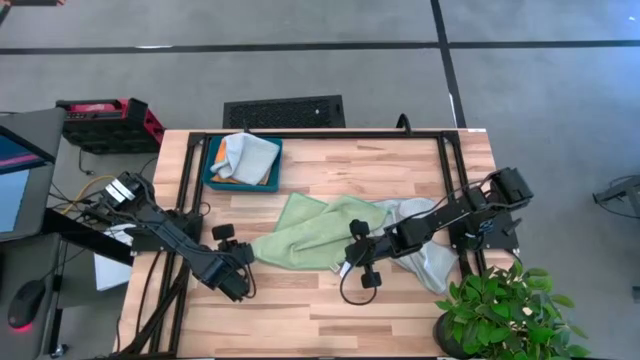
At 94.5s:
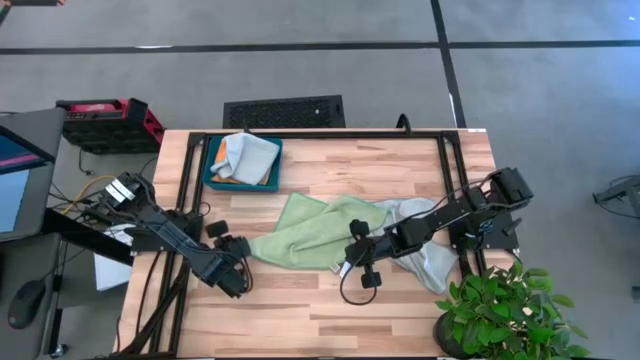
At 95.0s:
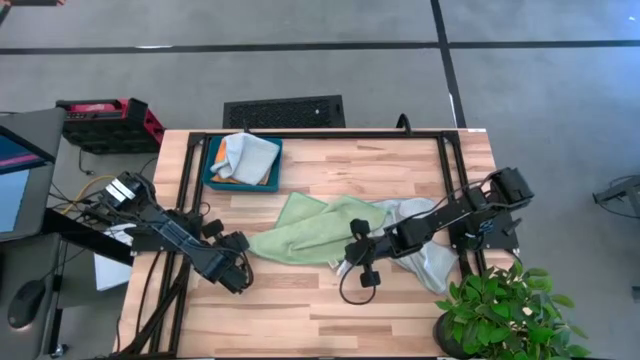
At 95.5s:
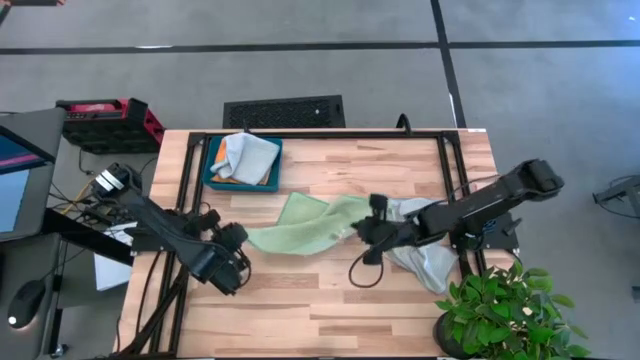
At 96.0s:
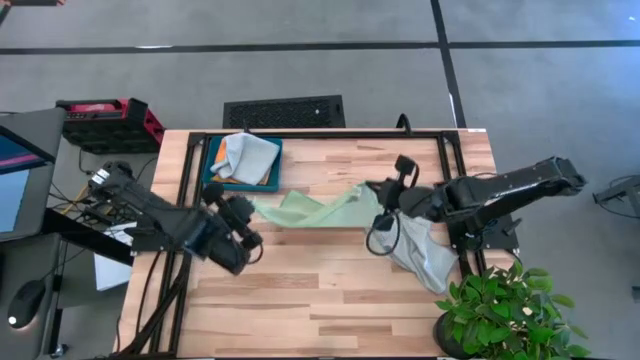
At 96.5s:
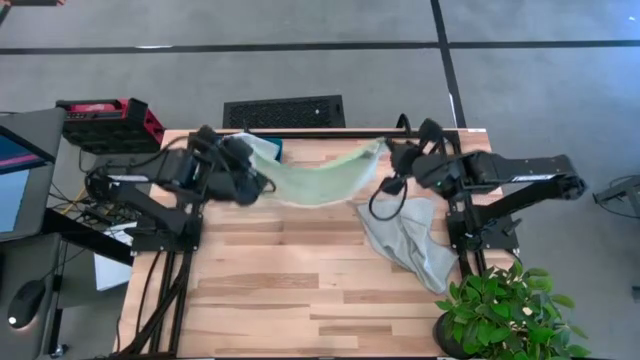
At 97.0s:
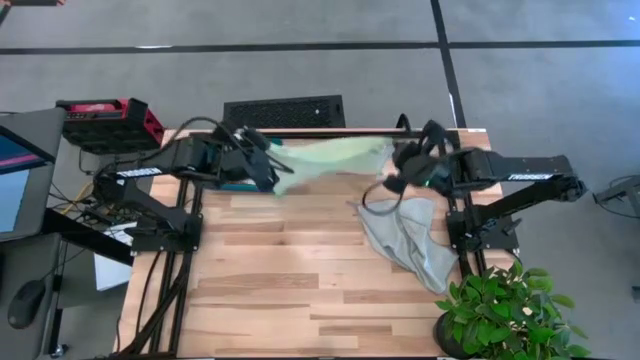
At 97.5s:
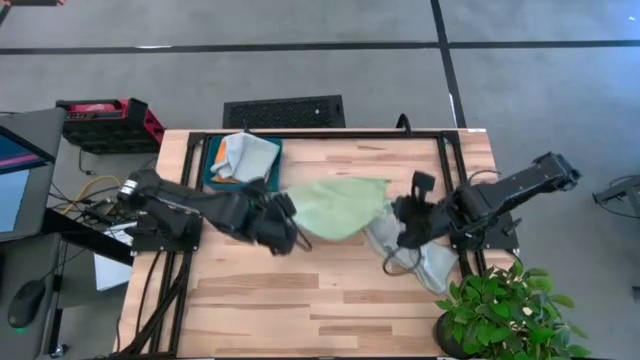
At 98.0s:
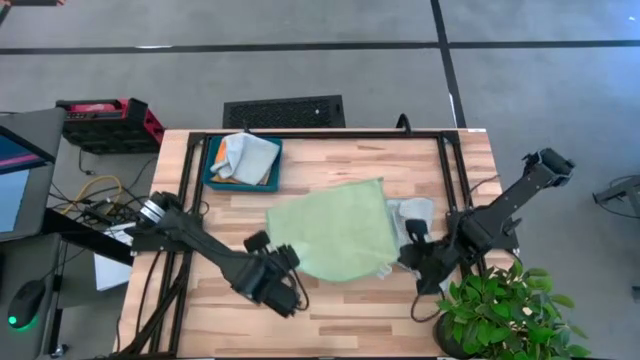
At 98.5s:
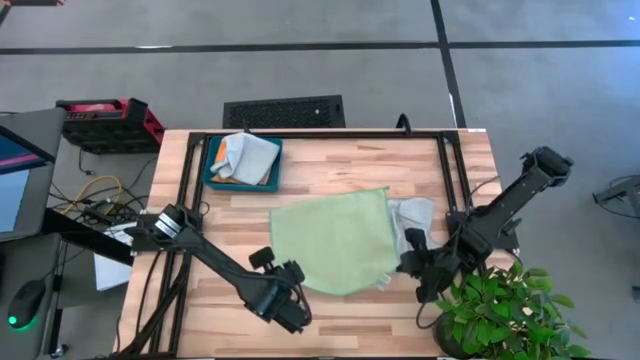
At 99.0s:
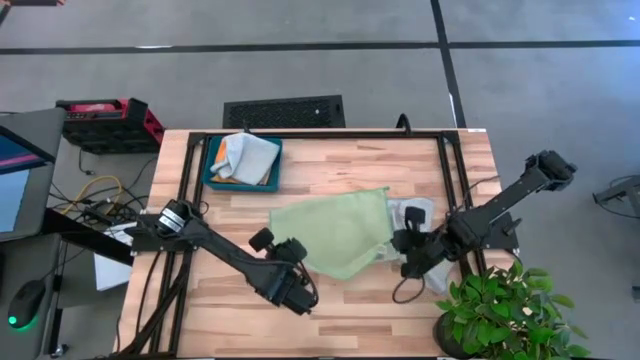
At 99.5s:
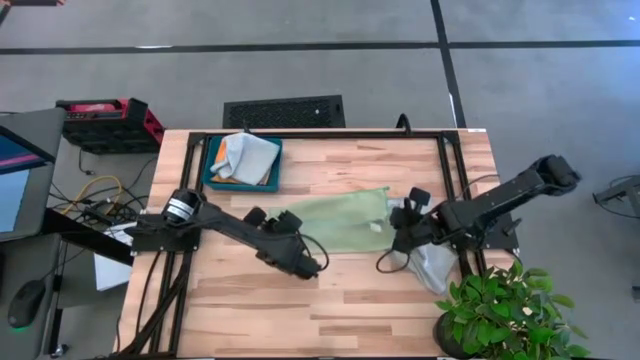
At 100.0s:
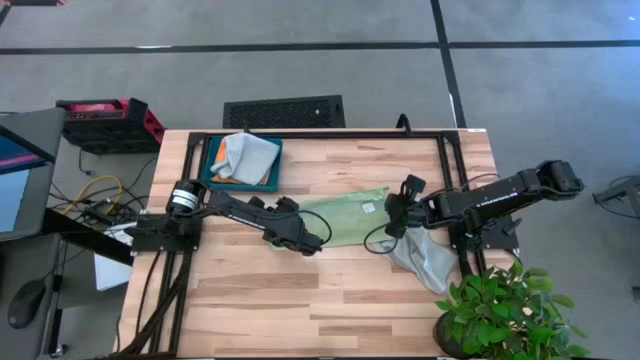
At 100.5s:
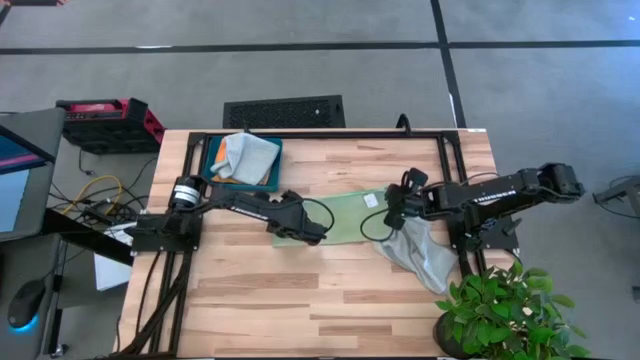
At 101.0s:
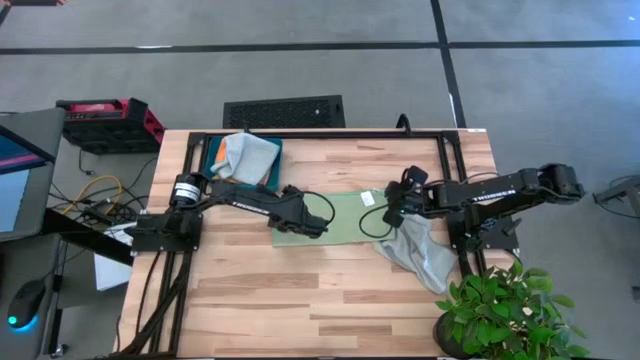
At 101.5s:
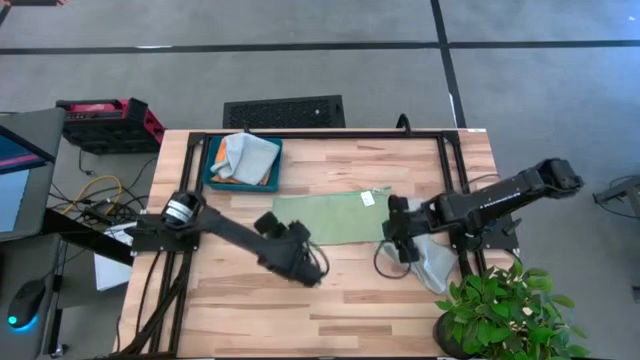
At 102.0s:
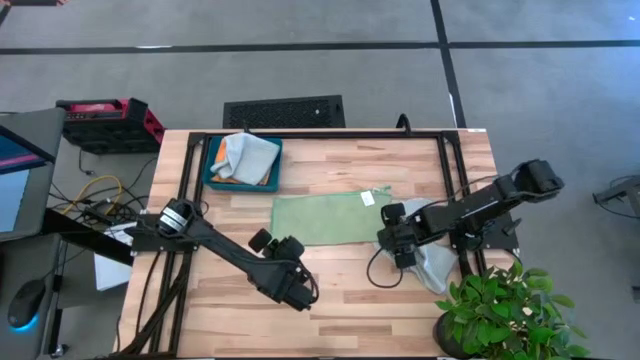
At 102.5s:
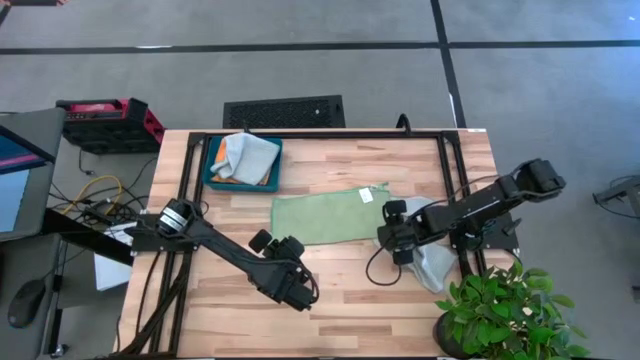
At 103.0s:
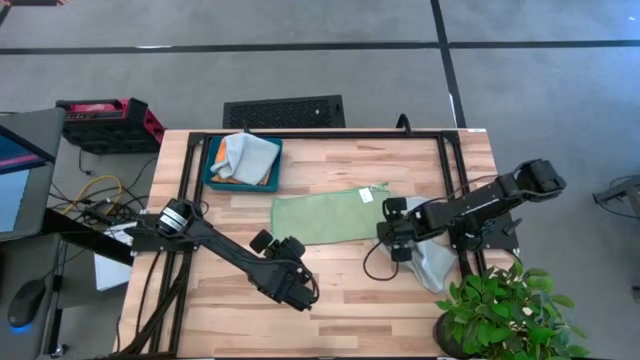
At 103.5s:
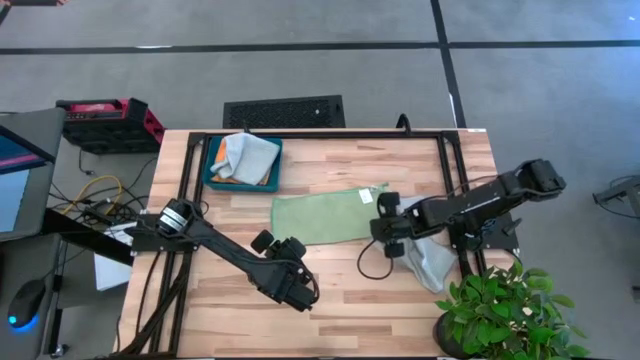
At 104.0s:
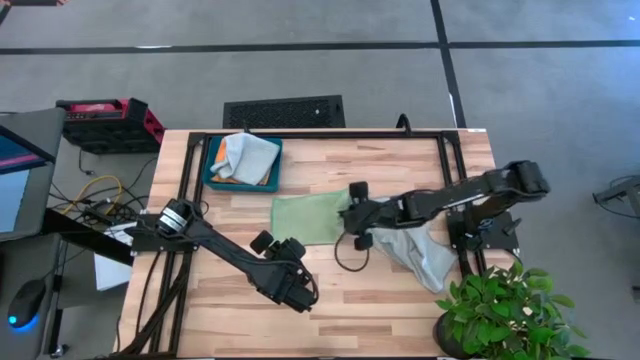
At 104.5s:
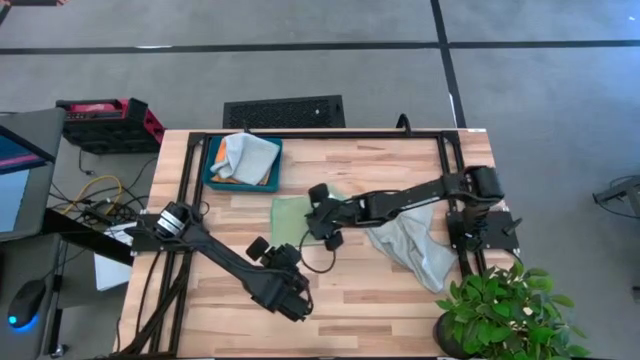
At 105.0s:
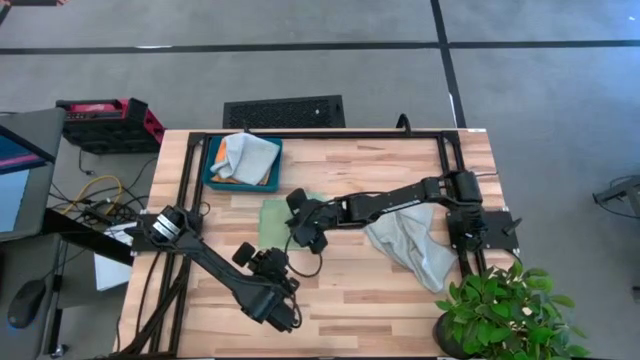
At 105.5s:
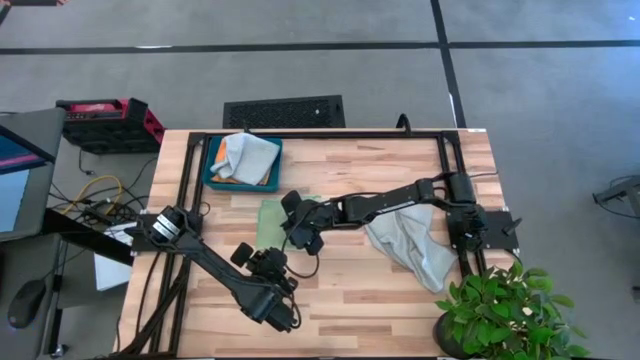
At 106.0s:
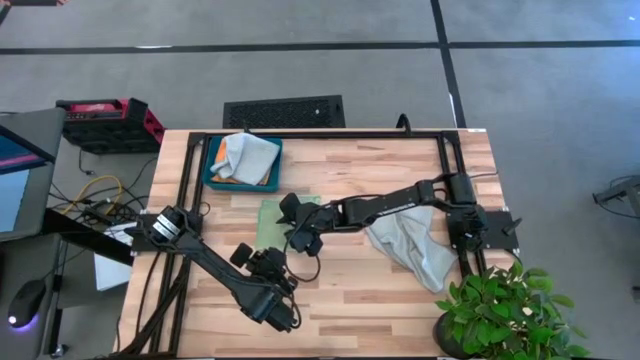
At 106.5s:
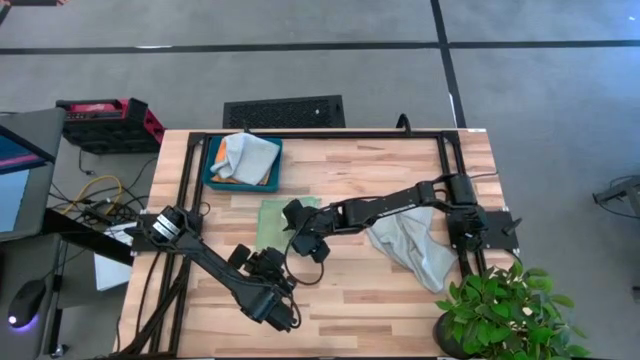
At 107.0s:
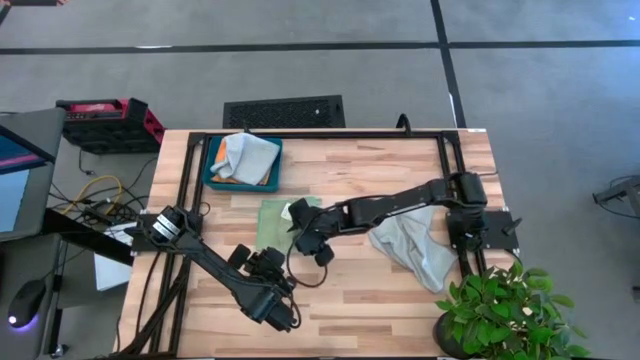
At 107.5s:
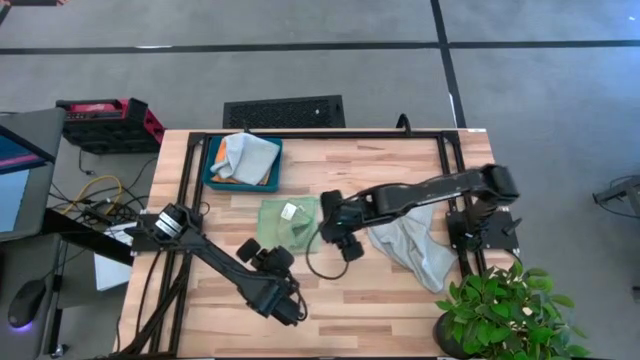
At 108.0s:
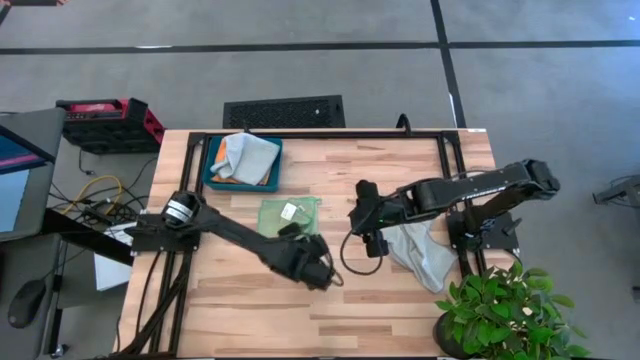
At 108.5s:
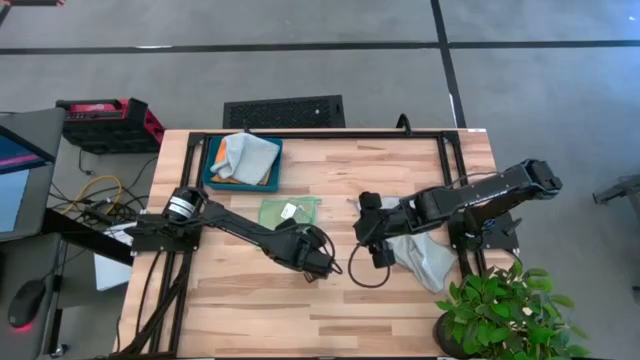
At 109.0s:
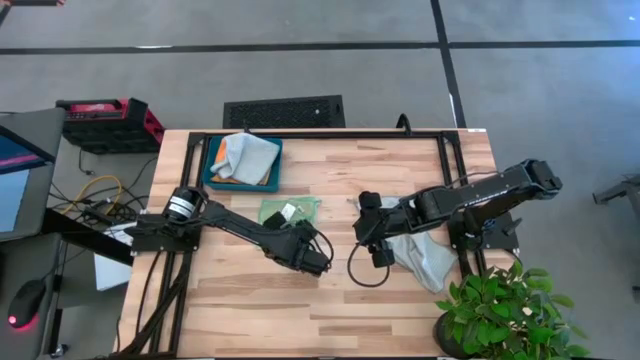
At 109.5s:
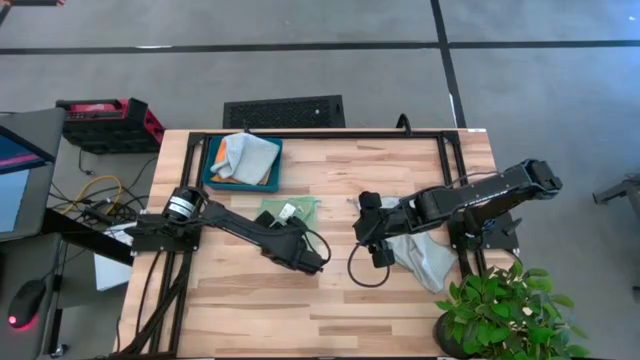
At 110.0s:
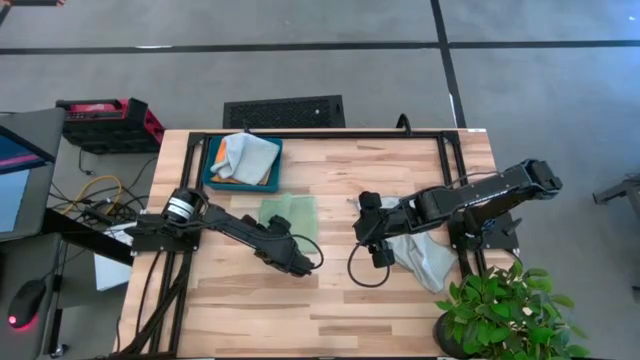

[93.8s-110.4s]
Task: Fold microfiber towels
Fold the green towel

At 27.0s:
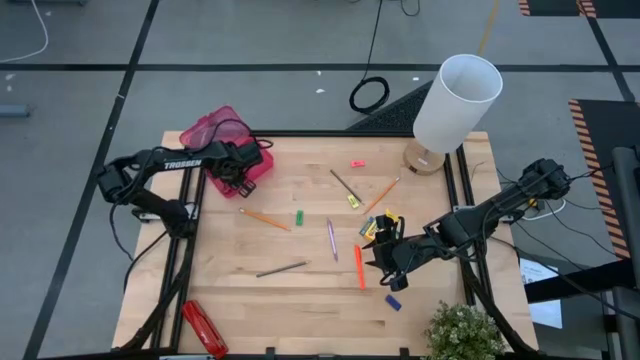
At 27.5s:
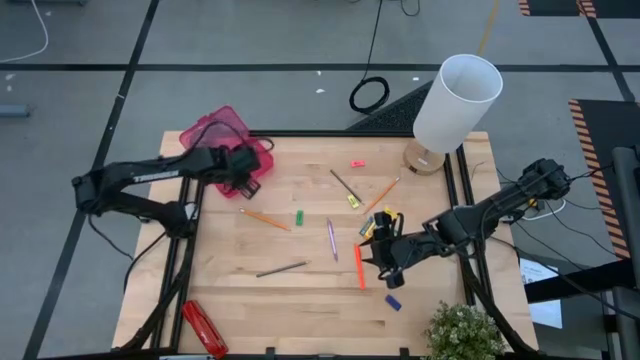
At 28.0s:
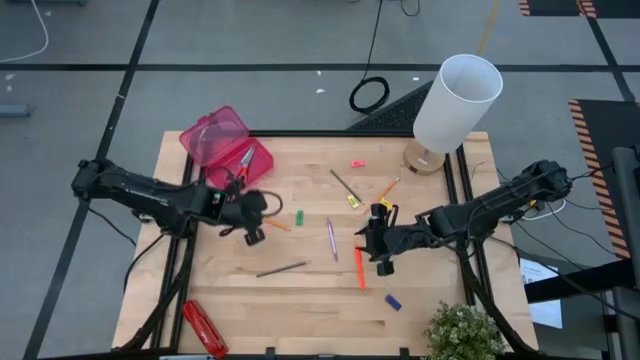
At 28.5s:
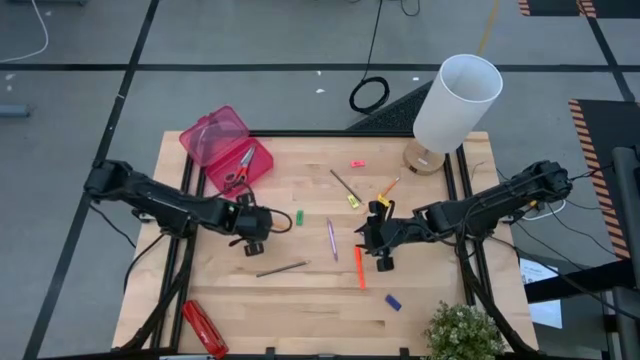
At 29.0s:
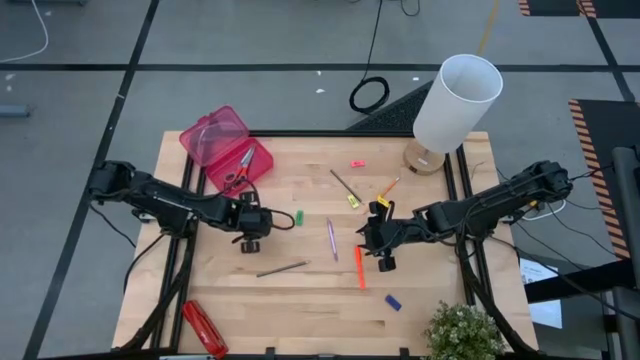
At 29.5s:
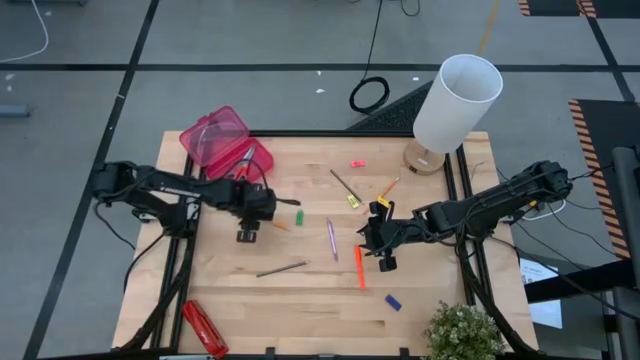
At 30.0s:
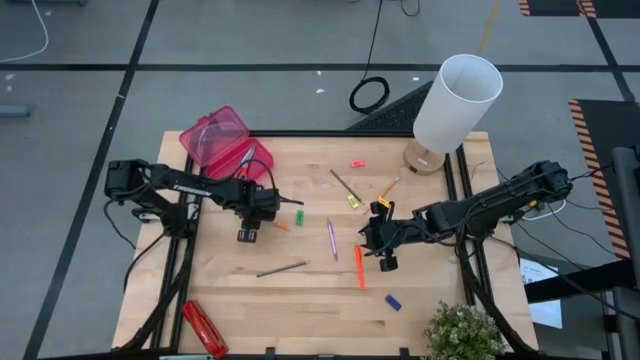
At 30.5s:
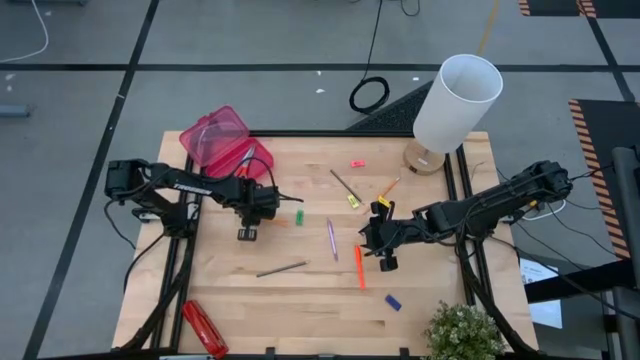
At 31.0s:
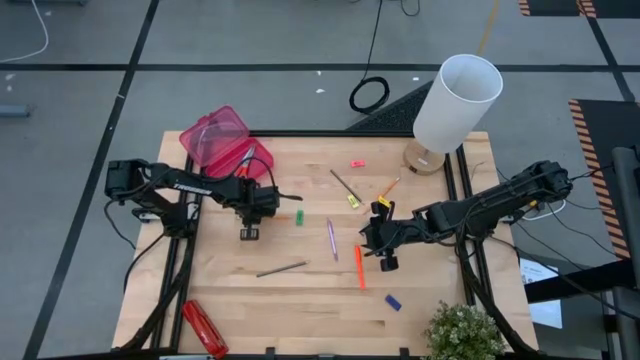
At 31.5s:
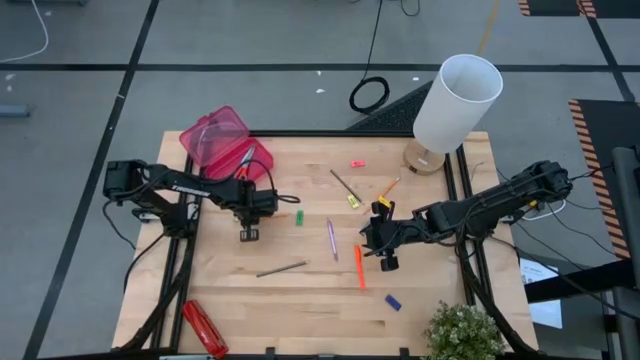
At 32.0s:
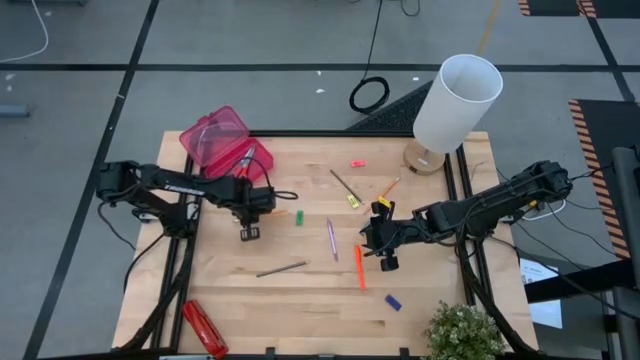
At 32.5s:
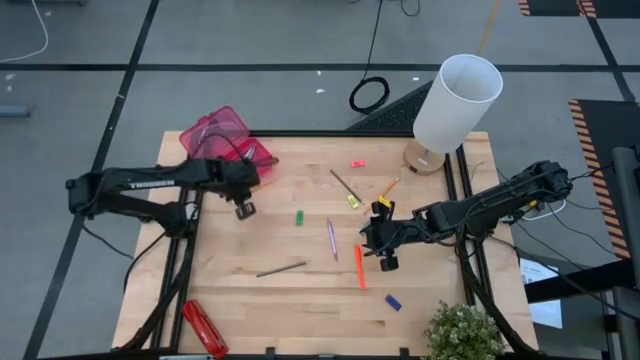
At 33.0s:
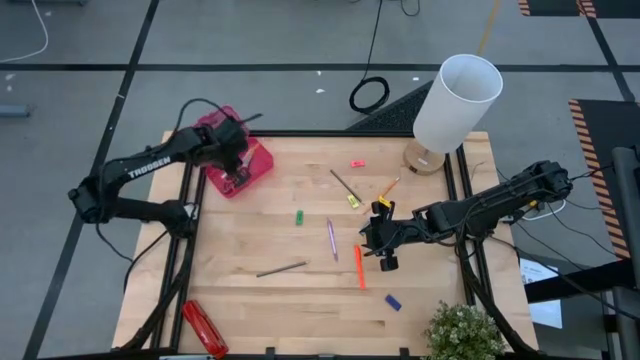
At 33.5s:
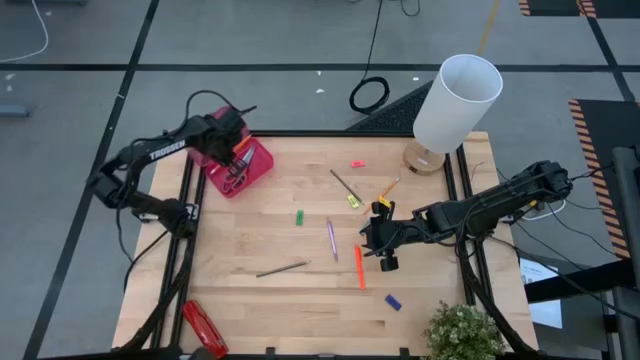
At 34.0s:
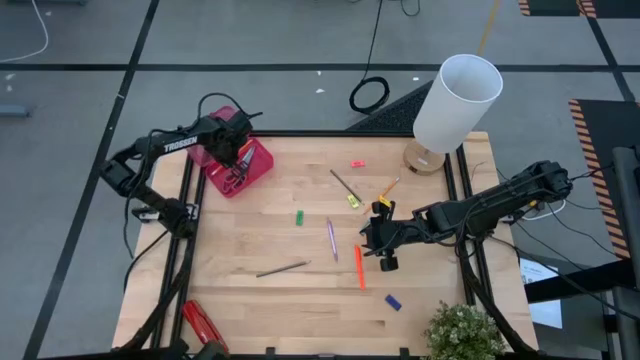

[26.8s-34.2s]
Task: Pack school essentials
Put the right yellow pencil into the pink supply box
